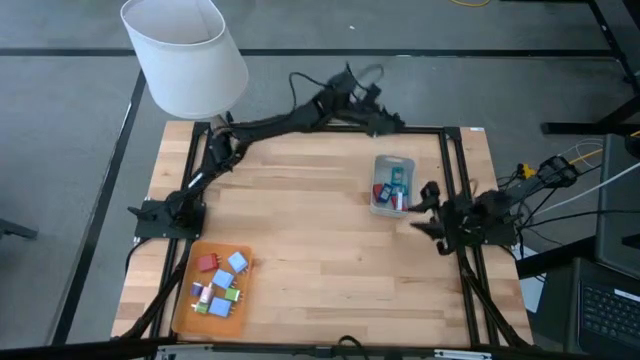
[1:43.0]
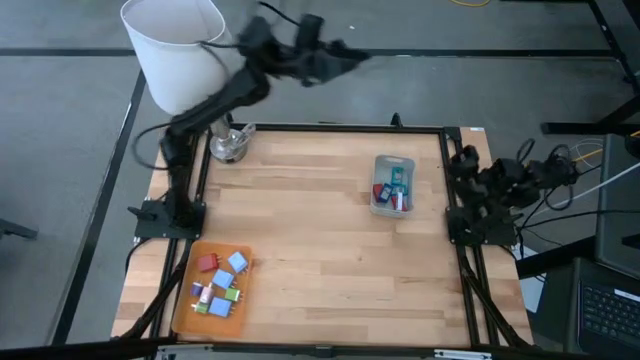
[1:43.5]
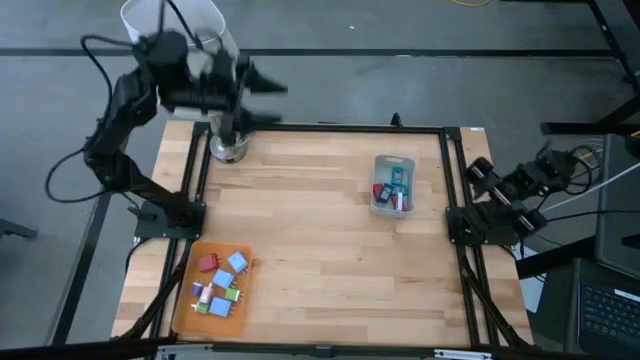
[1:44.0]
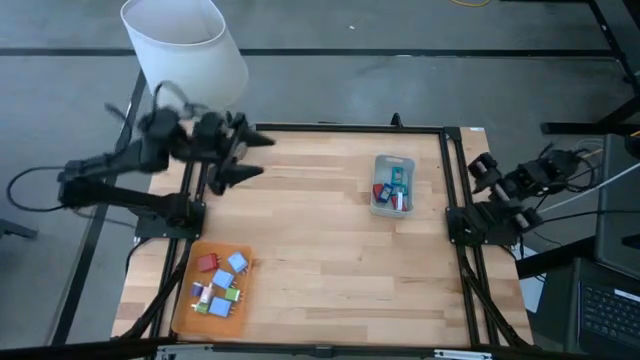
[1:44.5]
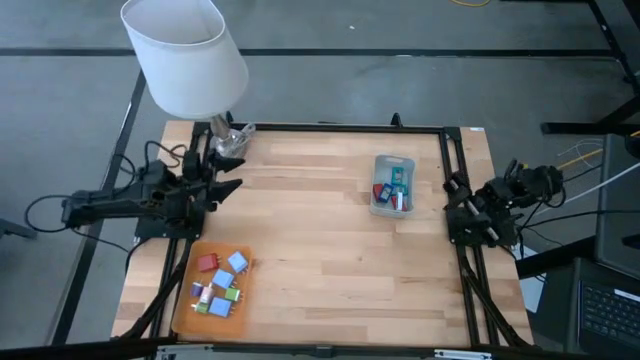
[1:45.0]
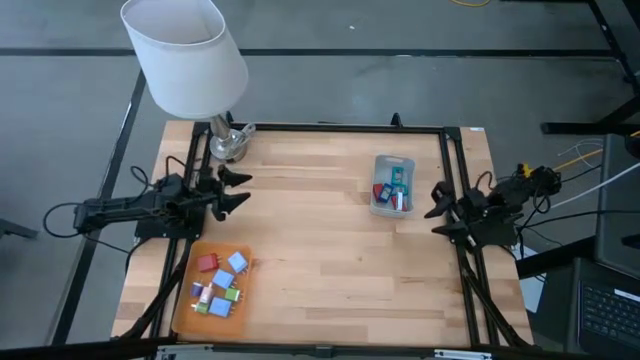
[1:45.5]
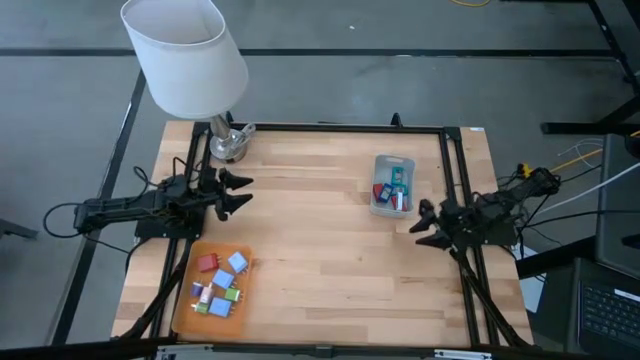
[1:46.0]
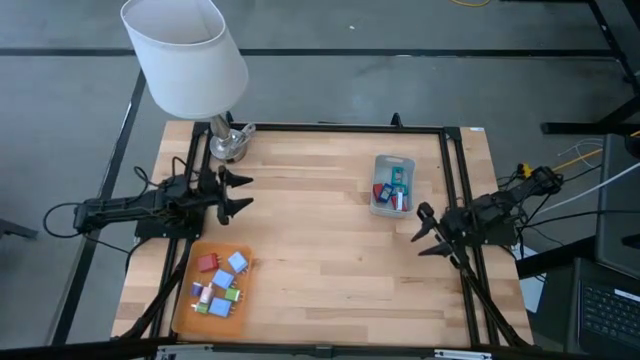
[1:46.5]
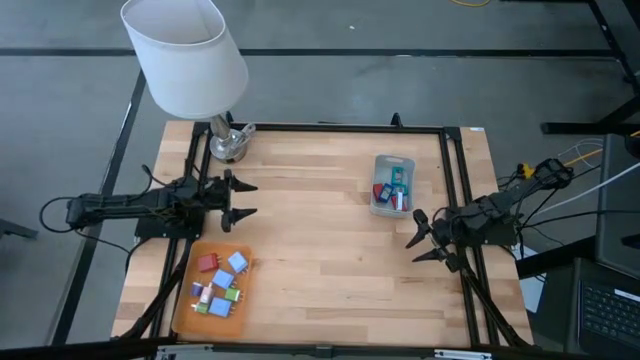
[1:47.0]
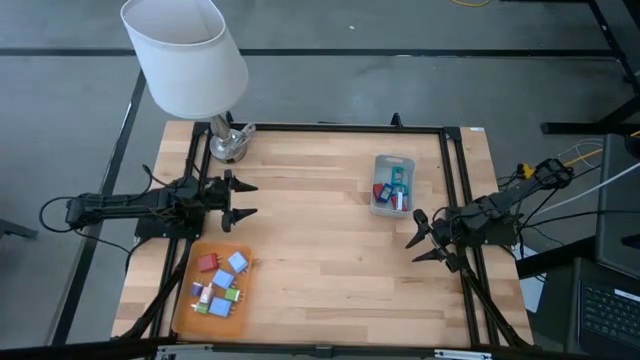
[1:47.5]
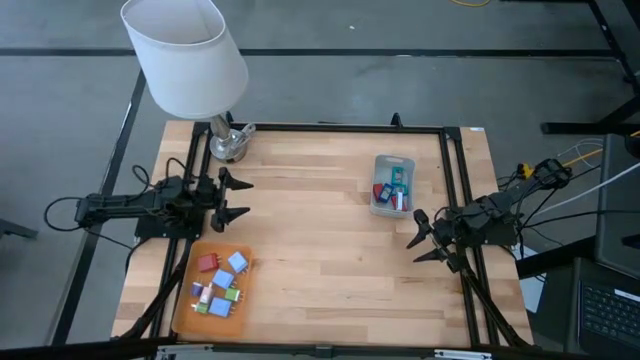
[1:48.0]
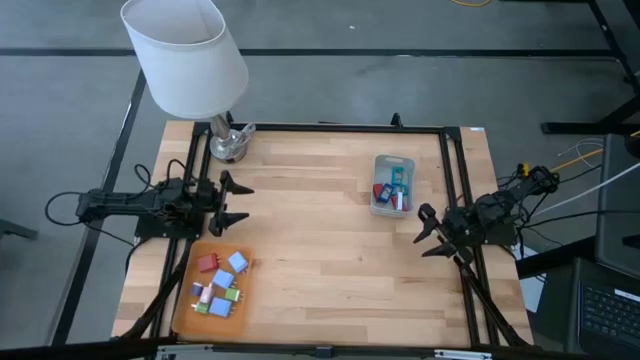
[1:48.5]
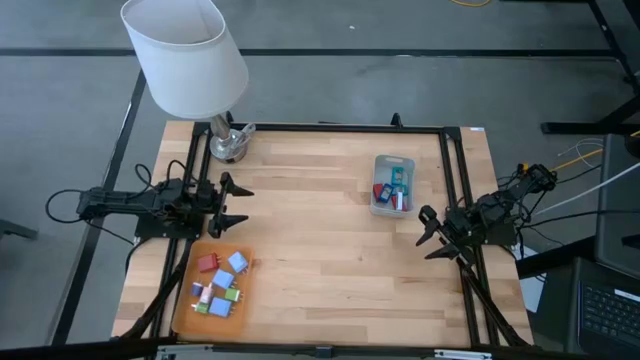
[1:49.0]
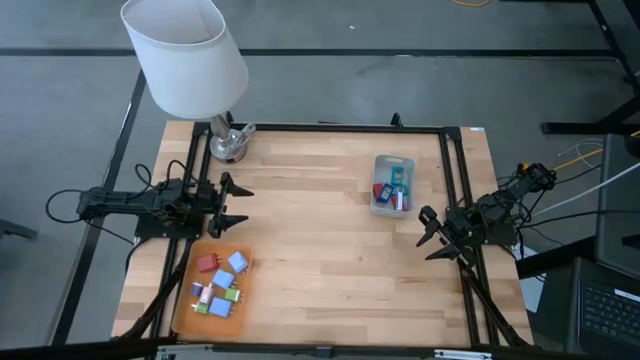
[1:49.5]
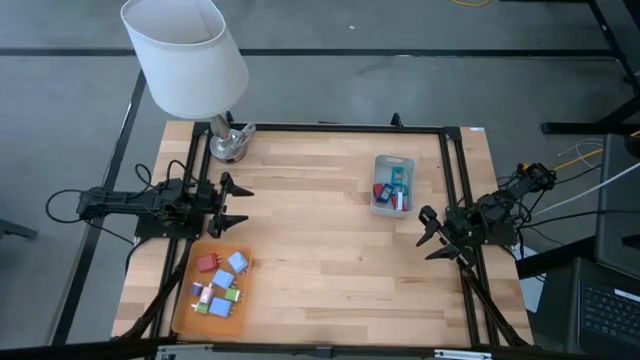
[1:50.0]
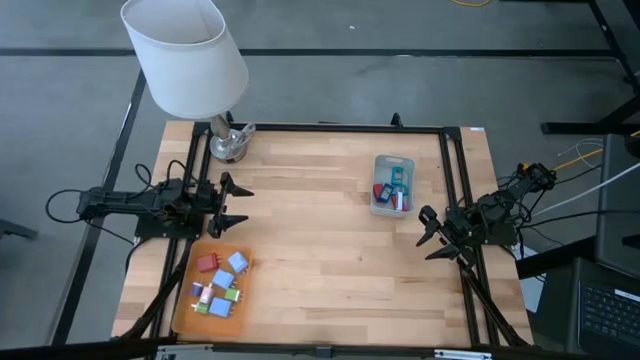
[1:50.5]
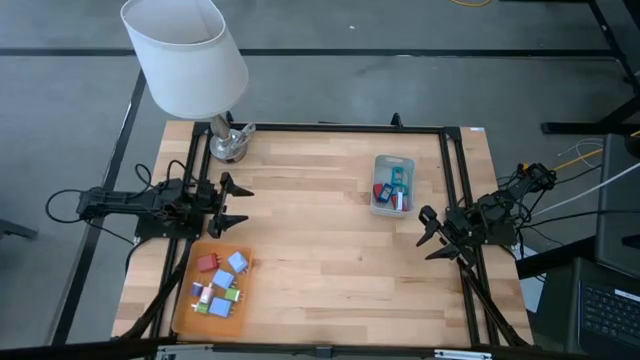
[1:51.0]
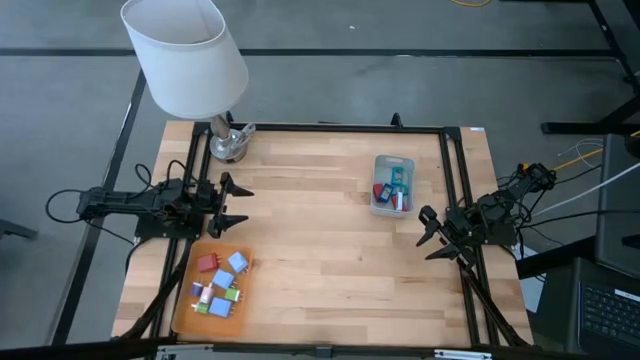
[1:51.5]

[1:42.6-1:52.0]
Task: Pick & Place Office items
Return to home position

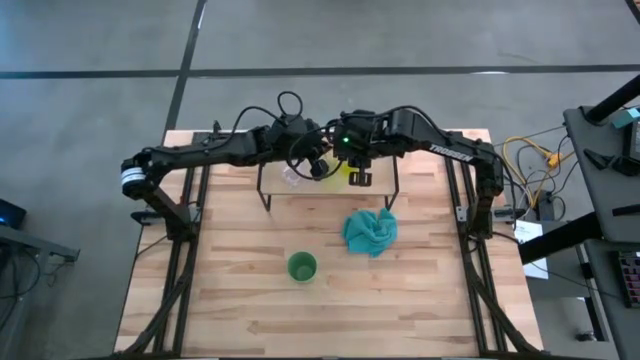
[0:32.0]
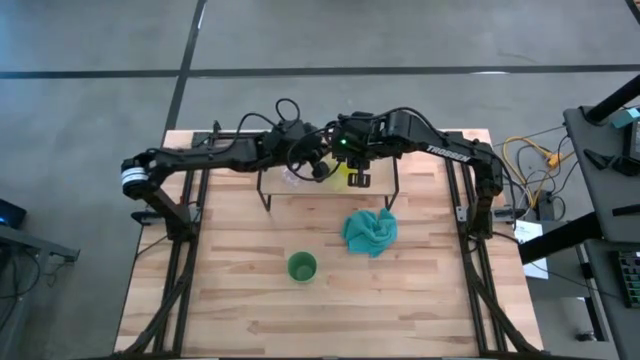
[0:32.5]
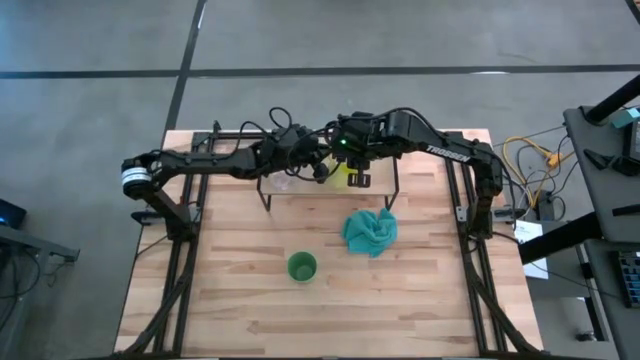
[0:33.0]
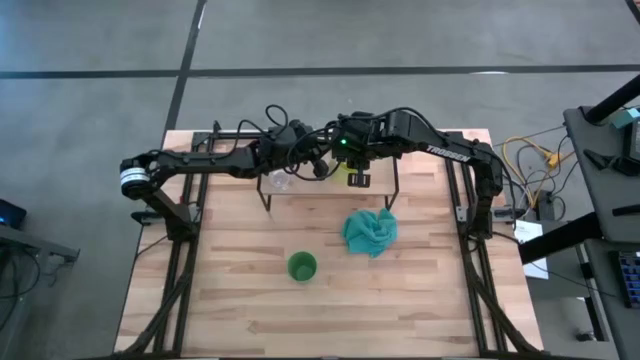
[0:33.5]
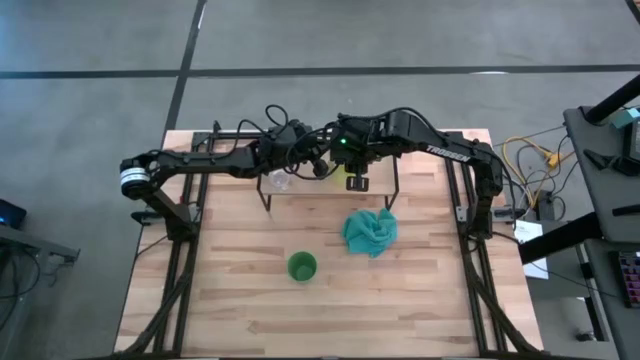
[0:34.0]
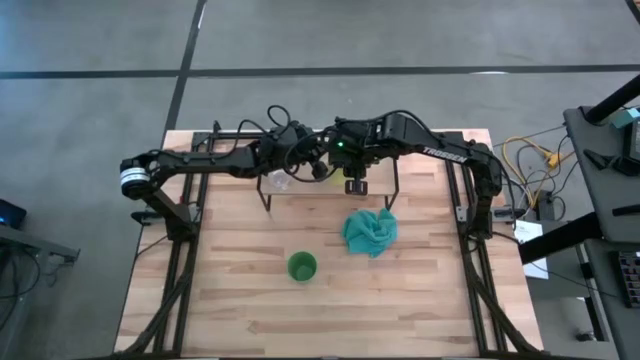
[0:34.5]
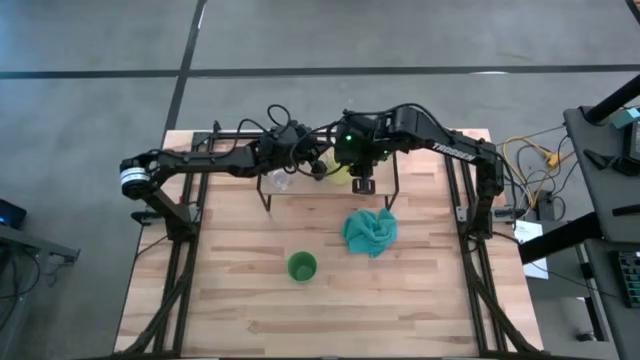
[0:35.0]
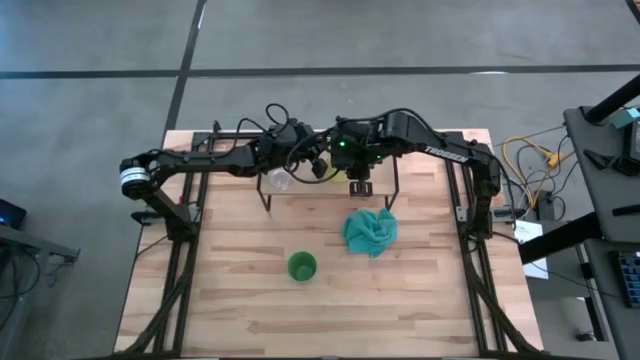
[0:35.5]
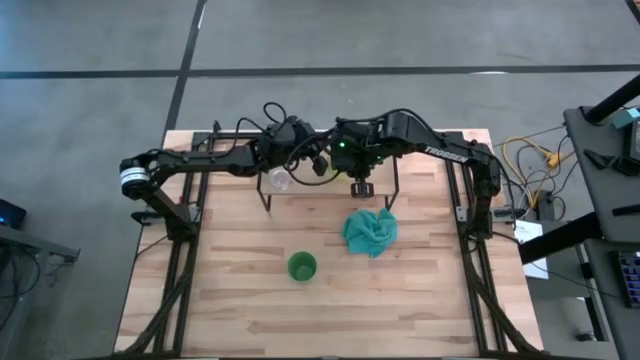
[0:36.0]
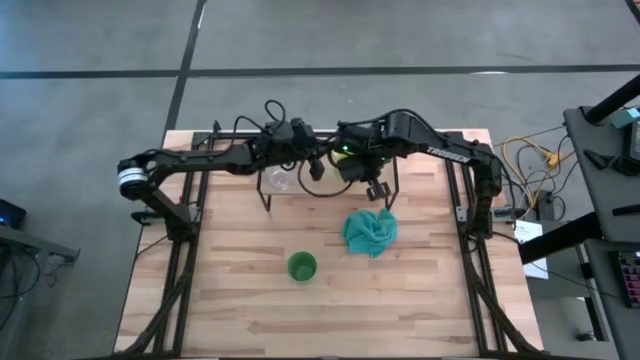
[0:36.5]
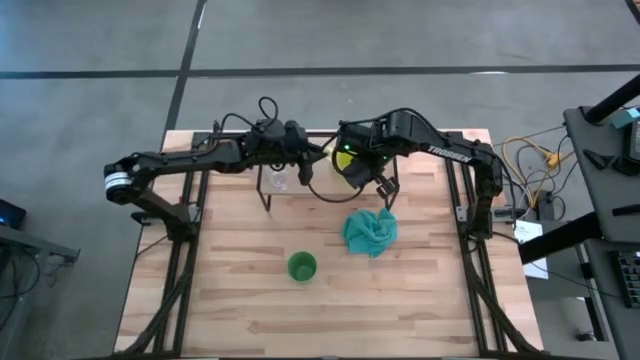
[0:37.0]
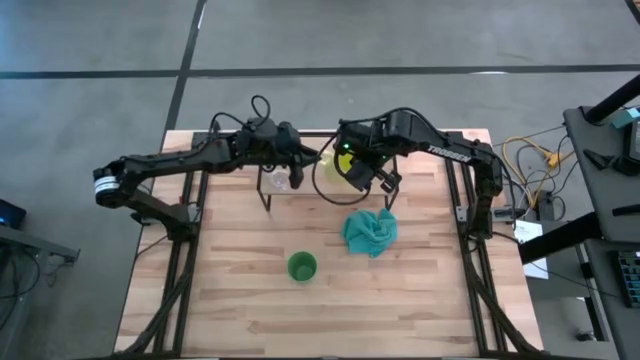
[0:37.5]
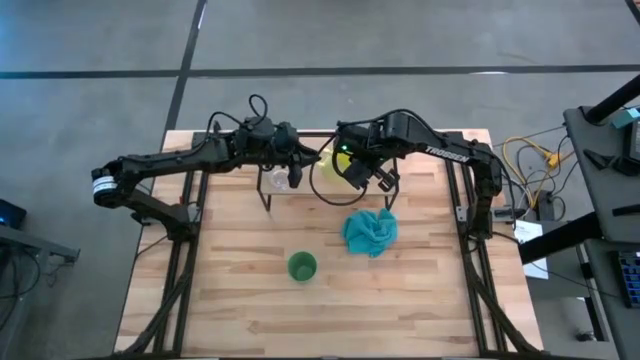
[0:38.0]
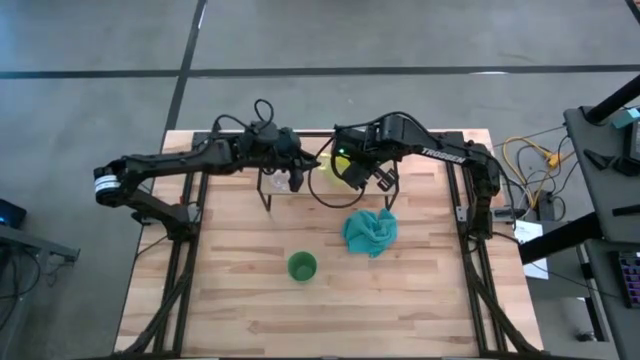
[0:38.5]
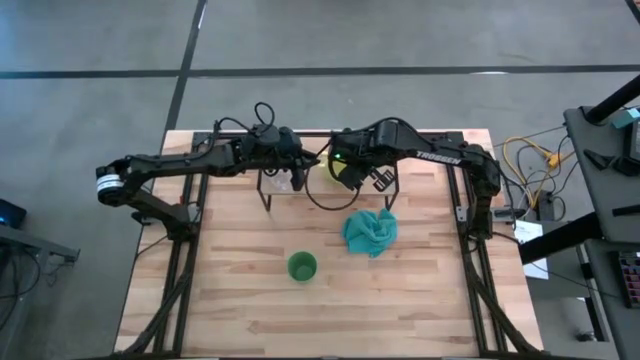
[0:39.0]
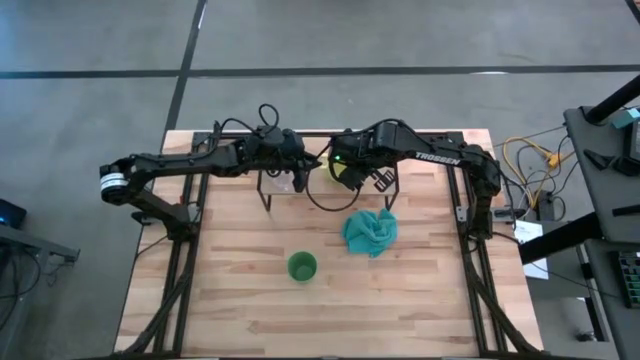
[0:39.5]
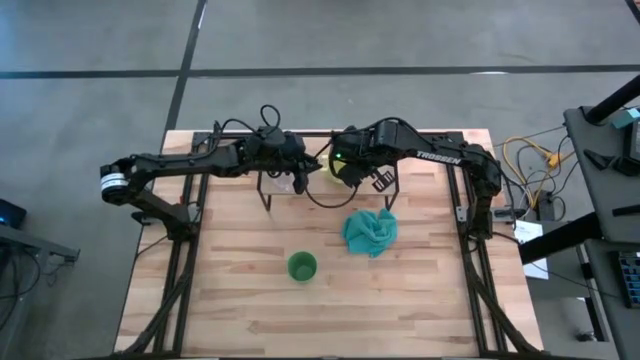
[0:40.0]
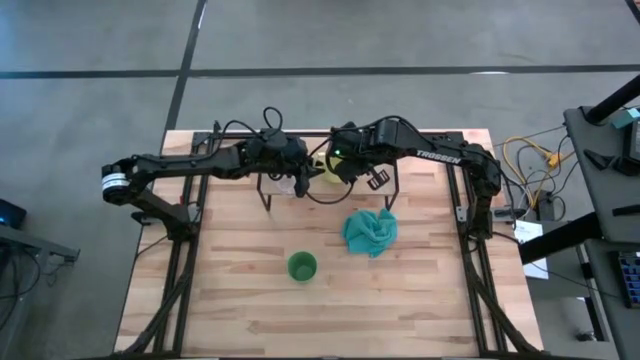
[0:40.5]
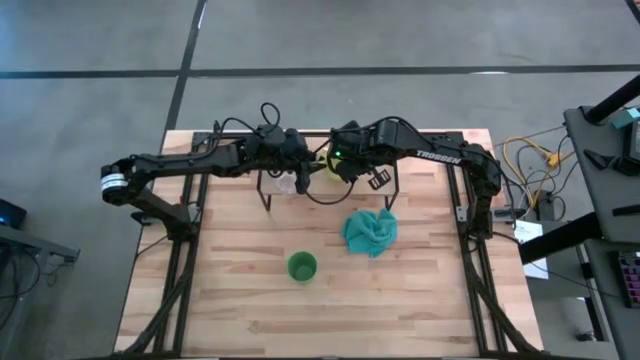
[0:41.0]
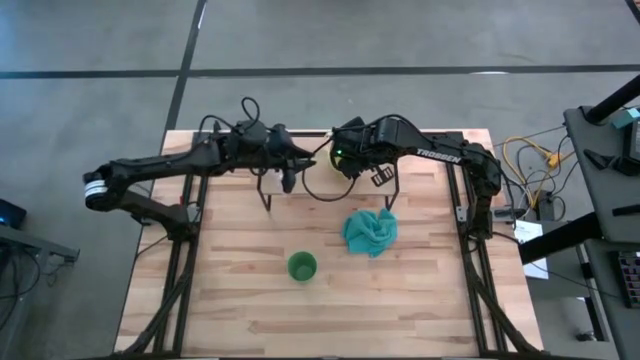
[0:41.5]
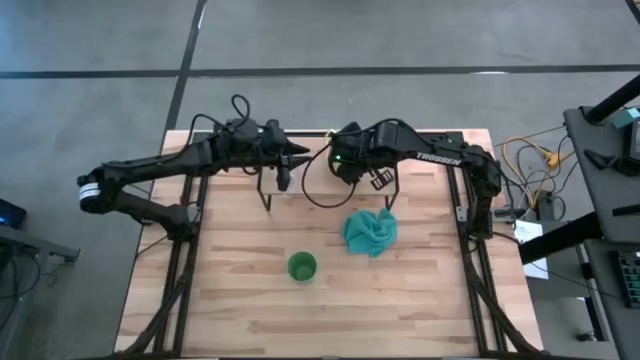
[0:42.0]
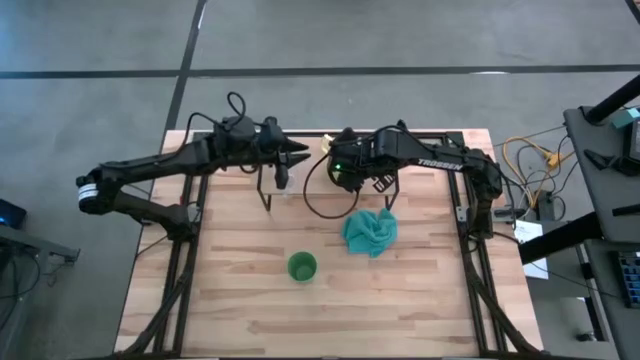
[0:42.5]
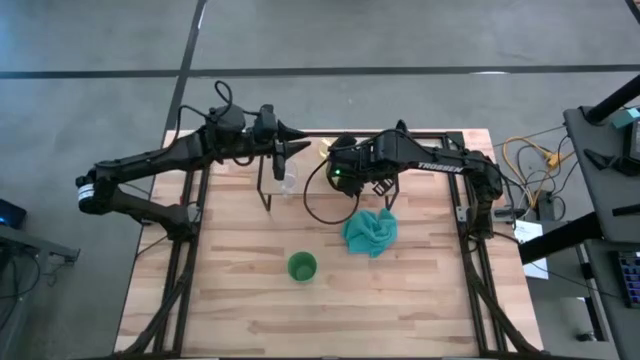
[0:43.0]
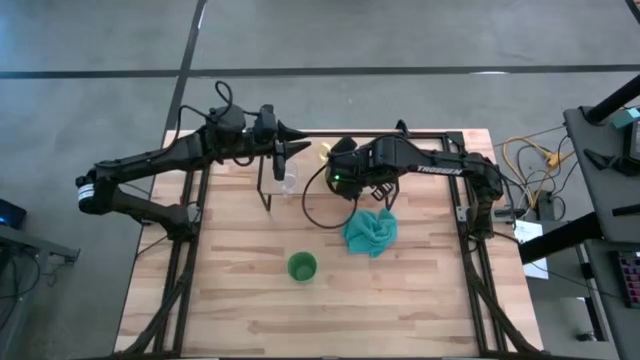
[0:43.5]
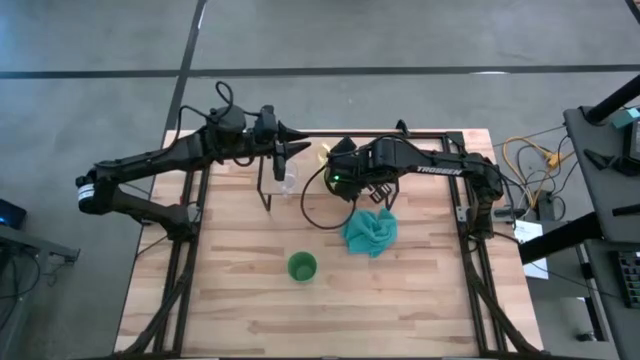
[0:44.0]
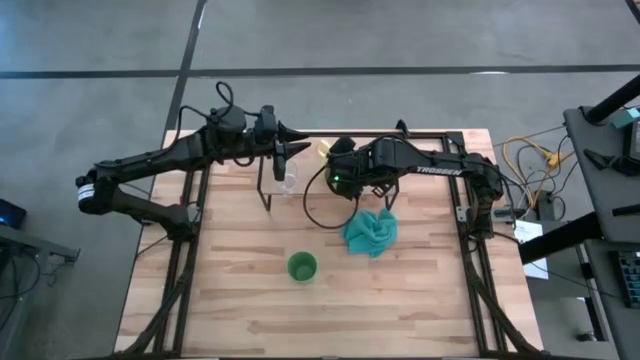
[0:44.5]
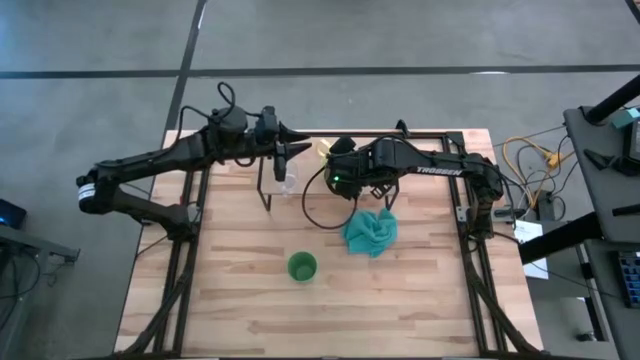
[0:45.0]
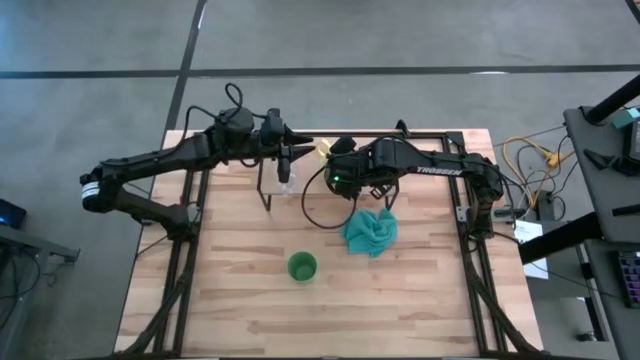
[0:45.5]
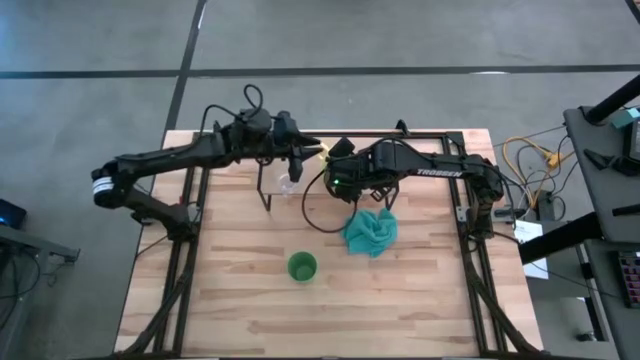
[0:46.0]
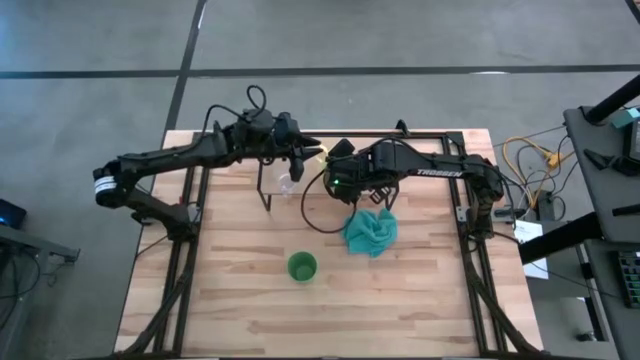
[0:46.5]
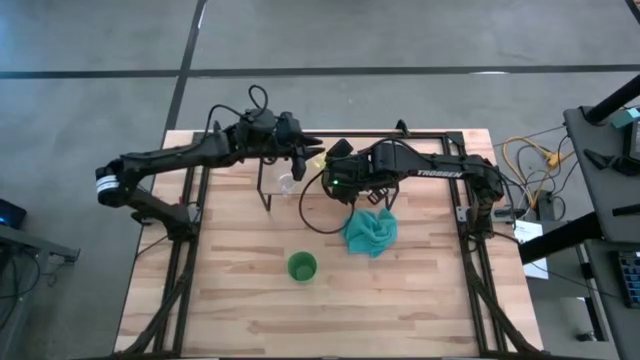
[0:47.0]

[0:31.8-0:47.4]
Task: Stack small to large cups/mugs on shelf
Put the yellow cup on the shelf
